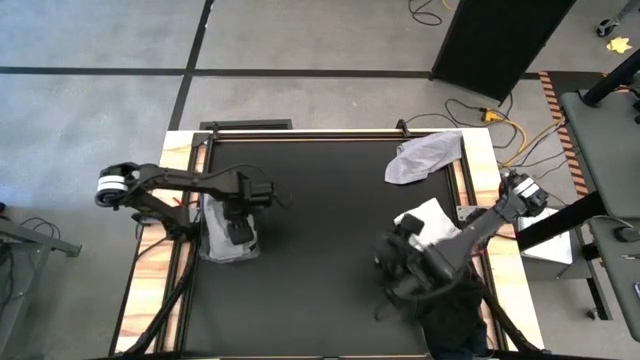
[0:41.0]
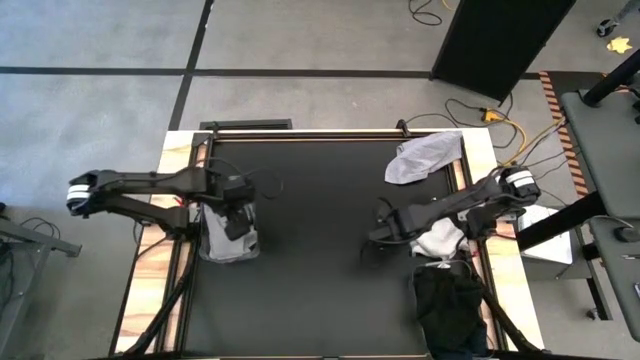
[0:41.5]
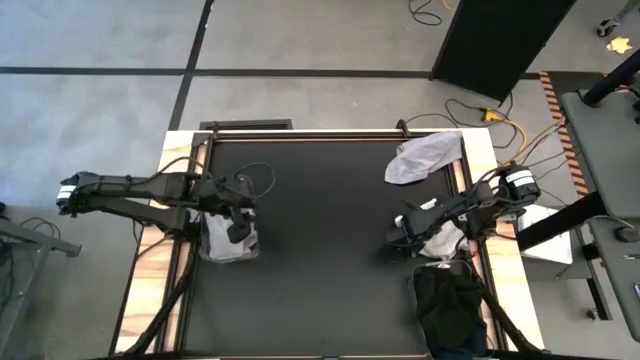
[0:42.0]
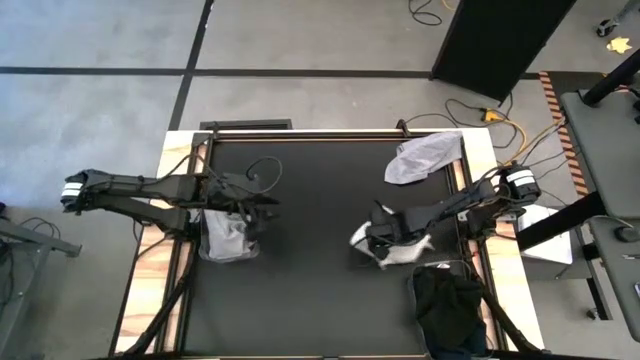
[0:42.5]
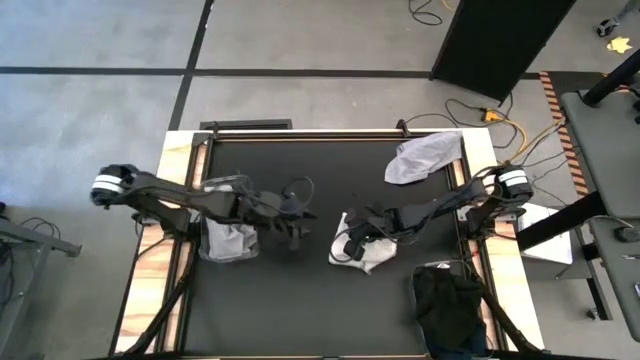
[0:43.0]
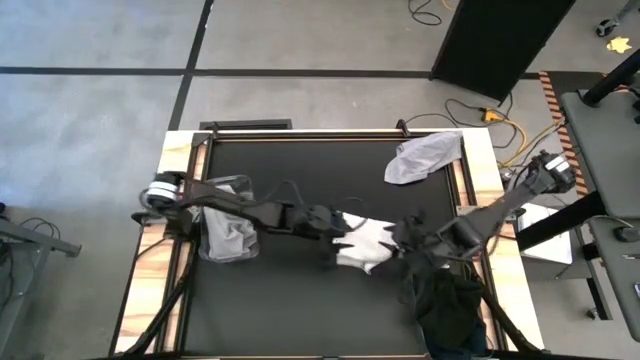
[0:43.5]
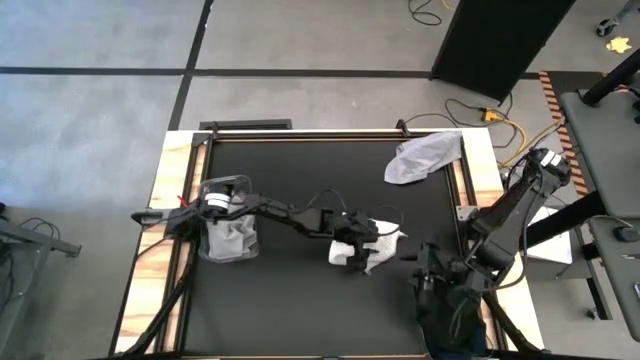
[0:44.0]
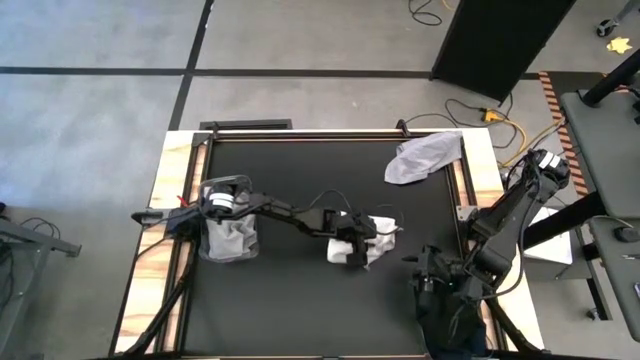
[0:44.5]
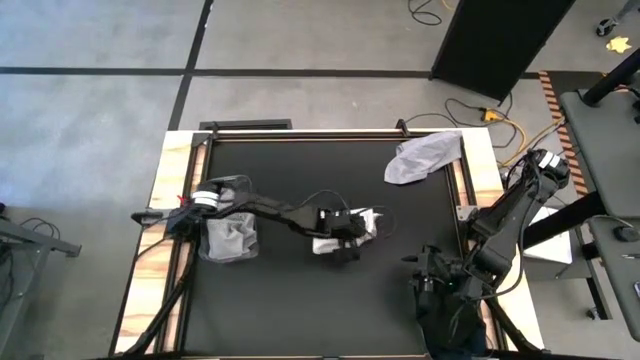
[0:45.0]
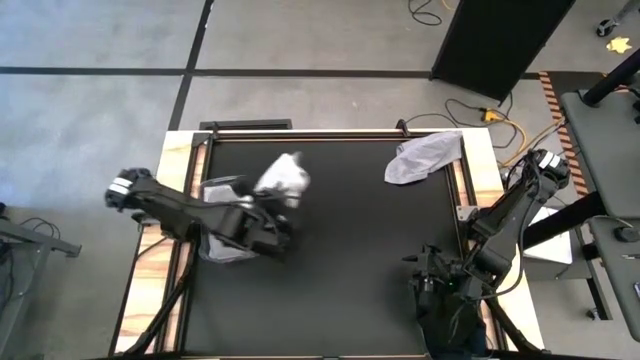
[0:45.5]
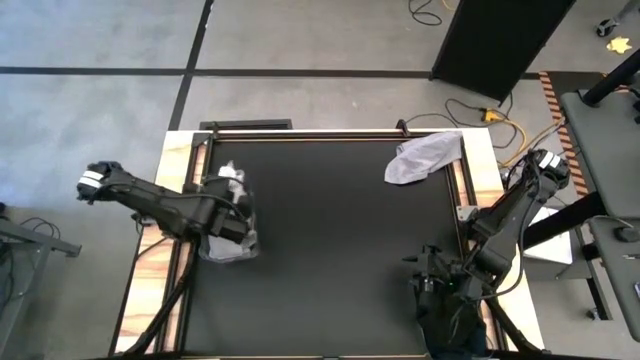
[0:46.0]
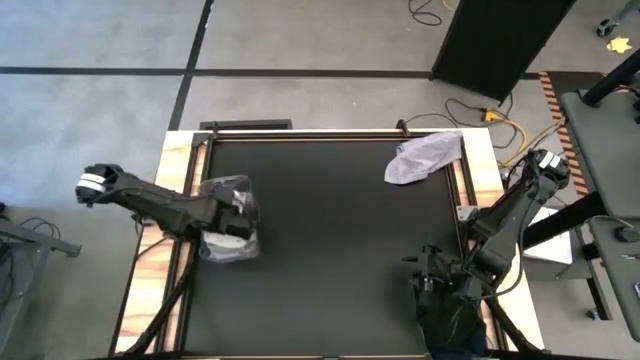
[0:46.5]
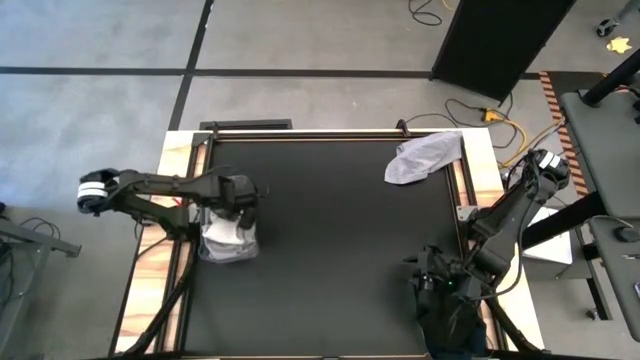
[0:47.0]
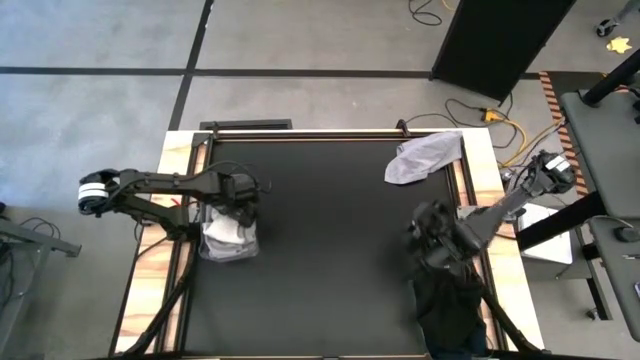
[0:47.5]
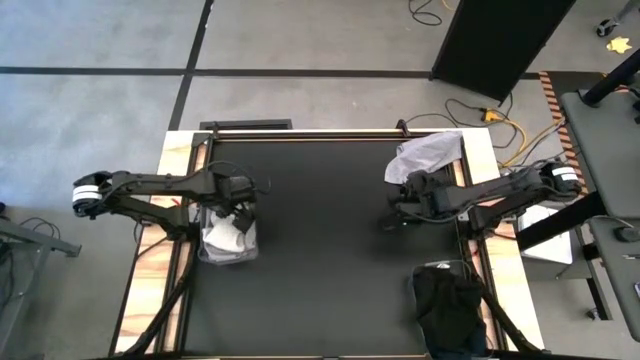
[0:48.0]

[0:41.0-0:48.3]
Task: Sort towels by color in basket
Put the white towel into the top transparent bin

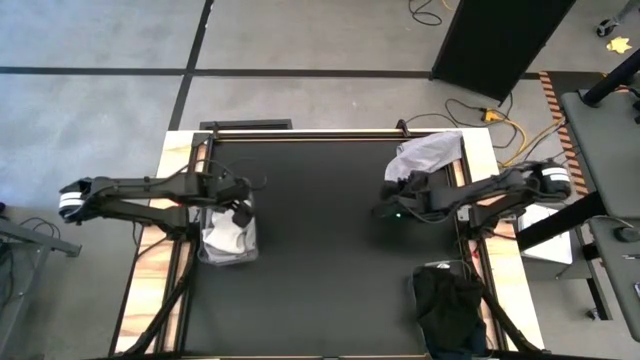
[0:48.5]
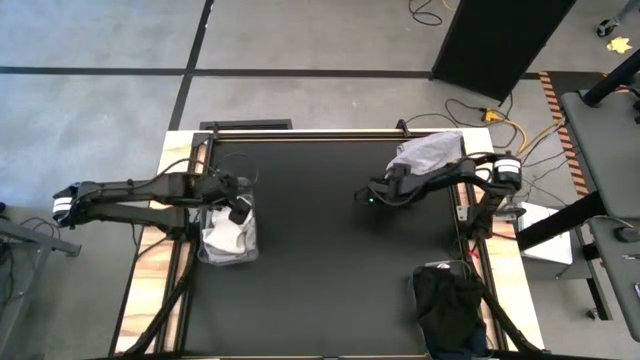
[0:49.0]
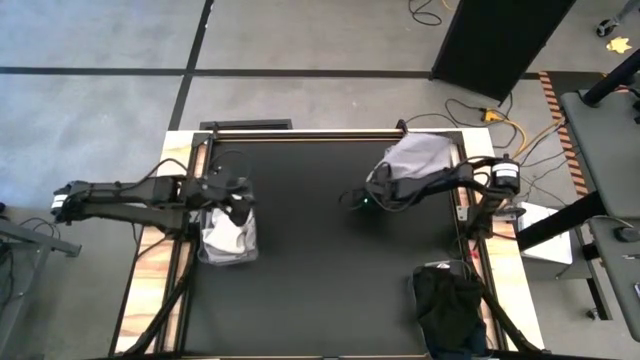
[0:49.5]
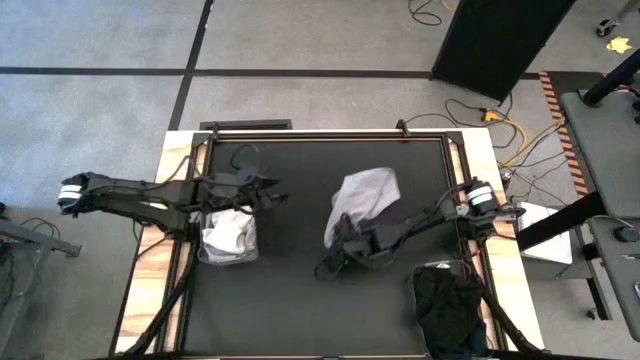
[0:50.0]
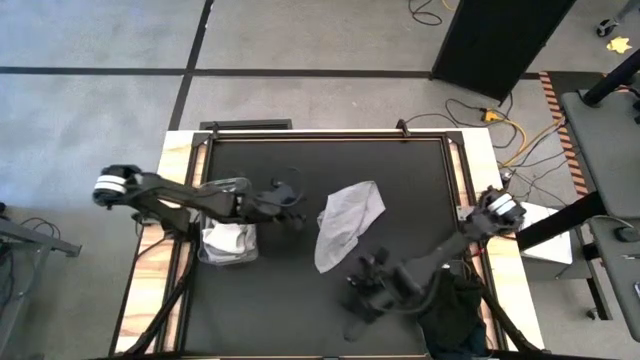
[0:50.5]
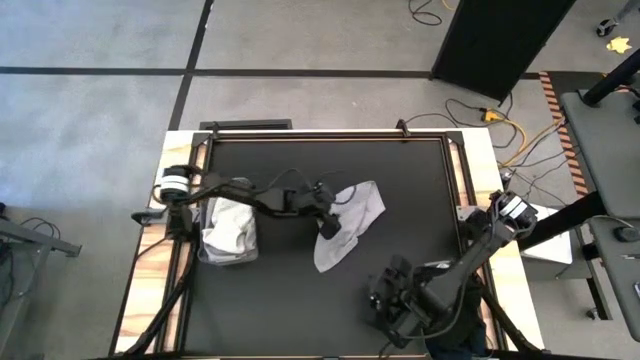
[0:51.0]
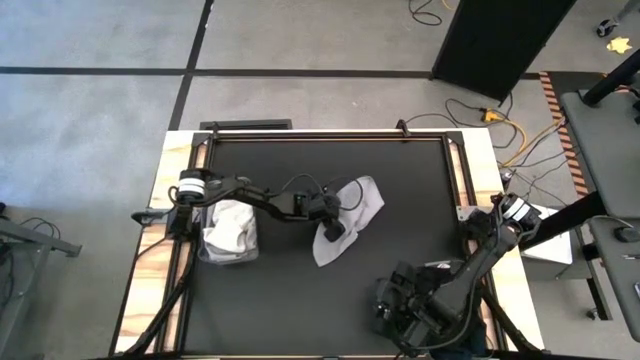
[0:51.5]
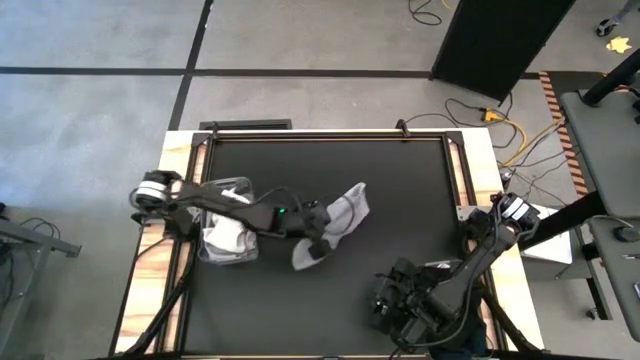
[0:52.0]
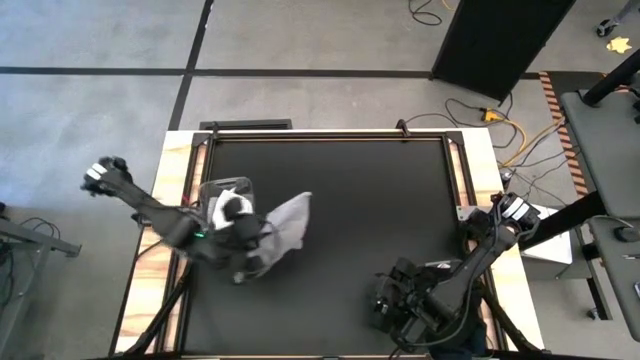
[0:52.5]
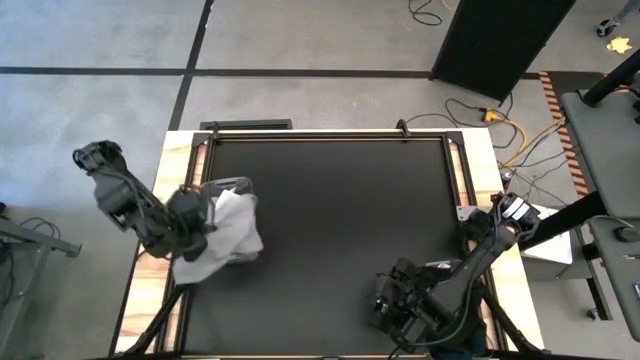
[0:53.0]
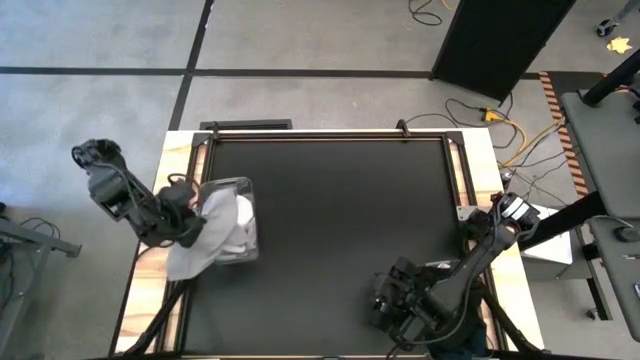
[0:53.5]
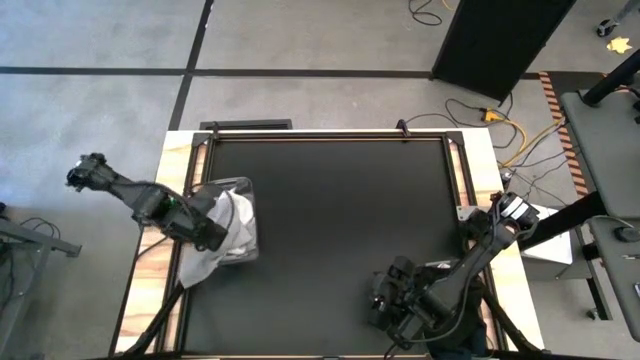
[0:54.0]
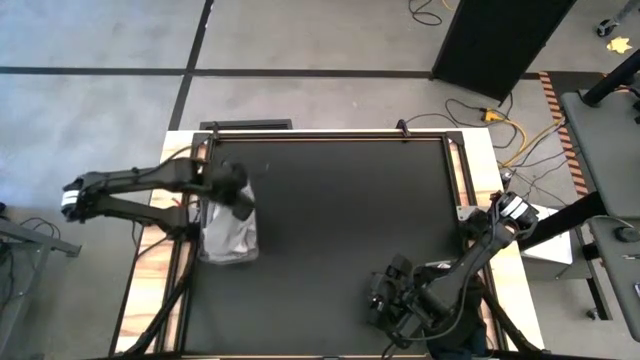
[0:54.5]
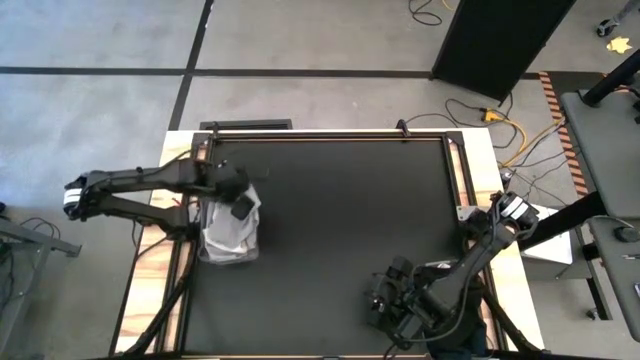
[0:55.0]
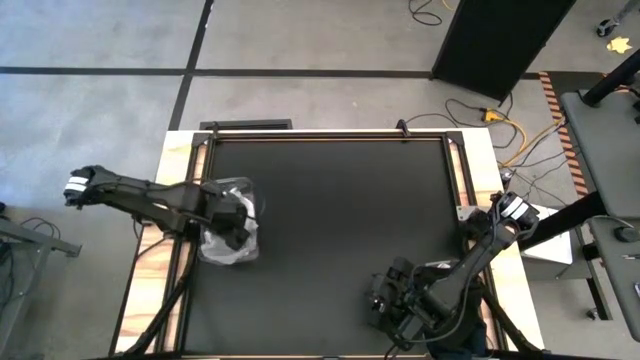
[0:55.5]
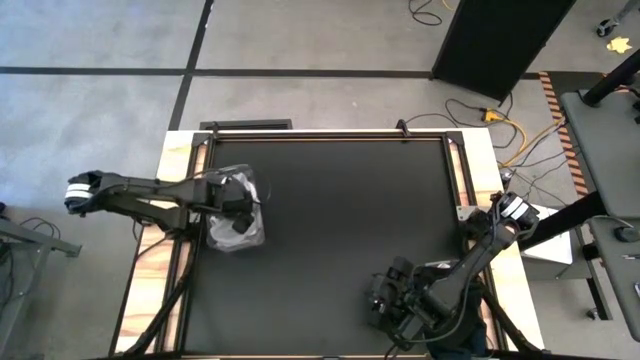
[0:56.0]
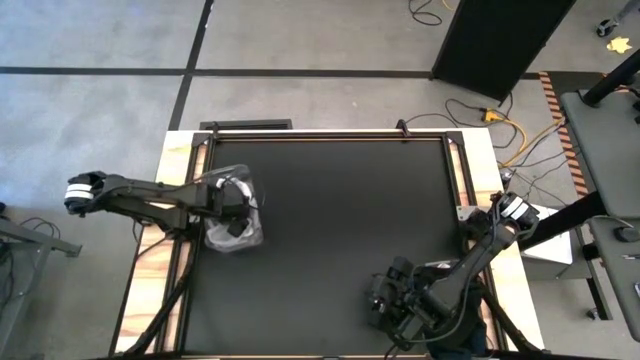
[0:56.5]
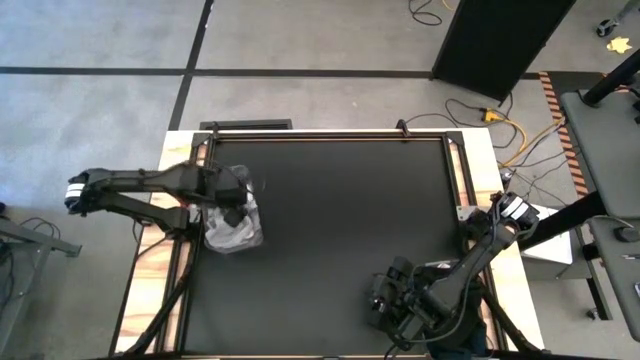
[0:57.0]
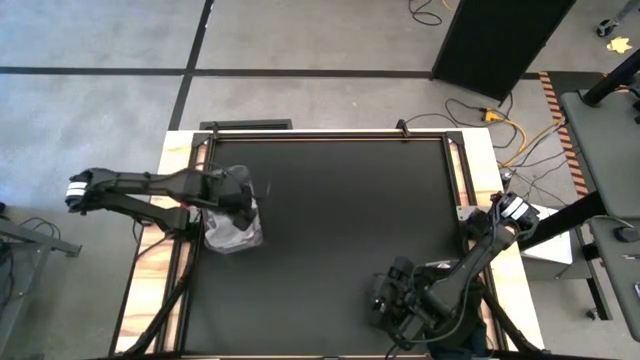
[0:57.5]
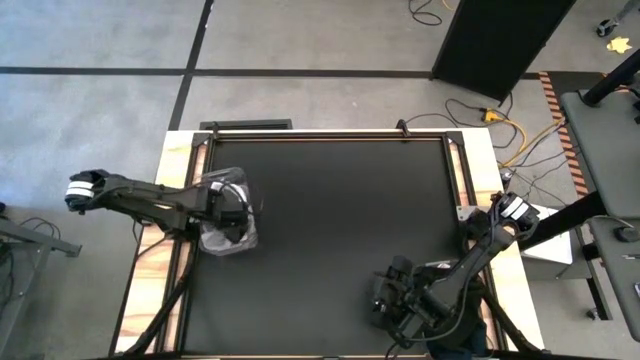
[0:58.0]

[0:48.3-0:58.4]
Put the gray towel into the top transparent bin

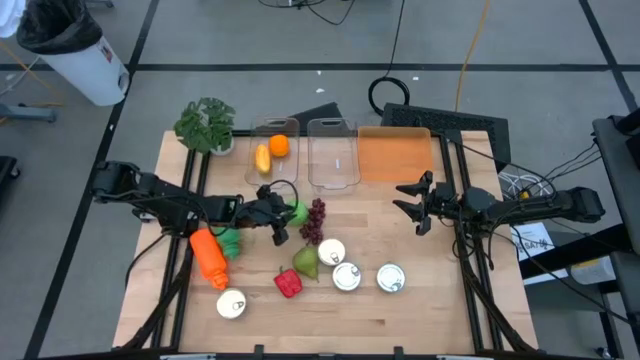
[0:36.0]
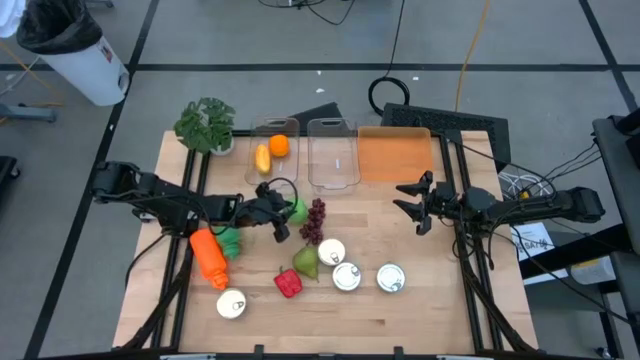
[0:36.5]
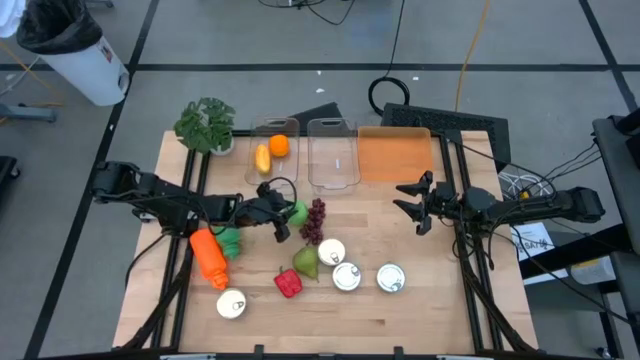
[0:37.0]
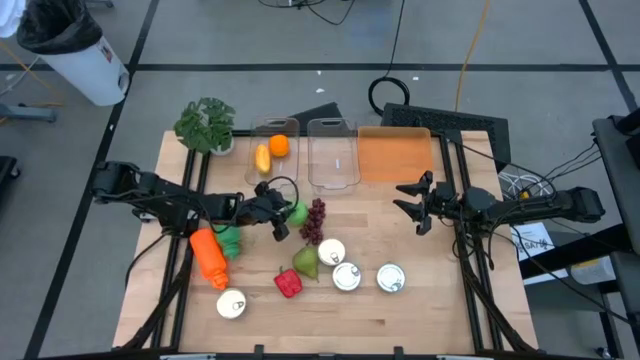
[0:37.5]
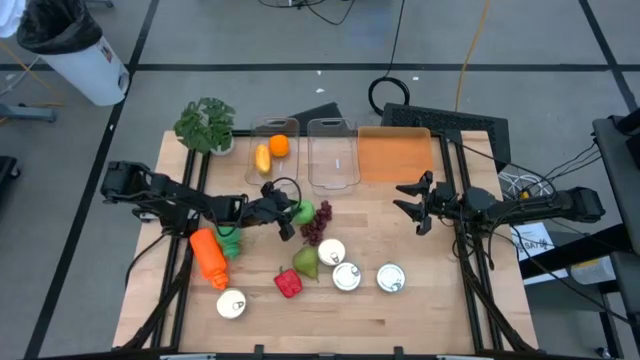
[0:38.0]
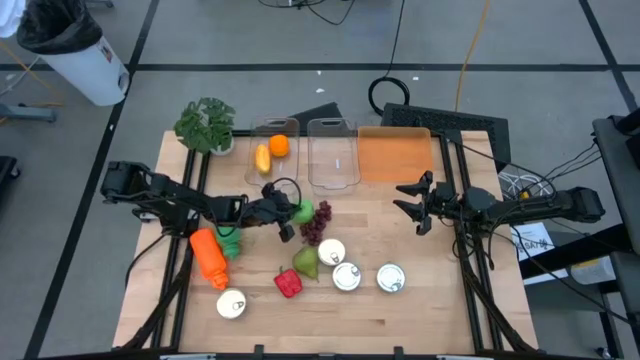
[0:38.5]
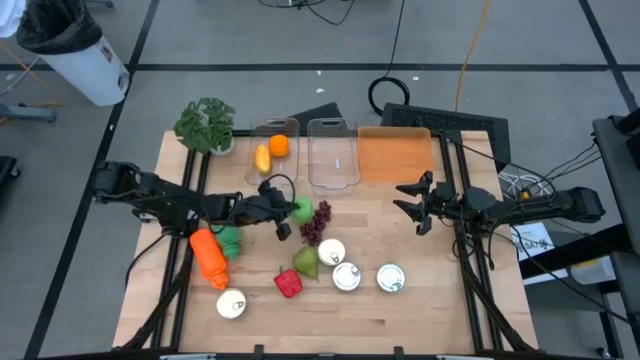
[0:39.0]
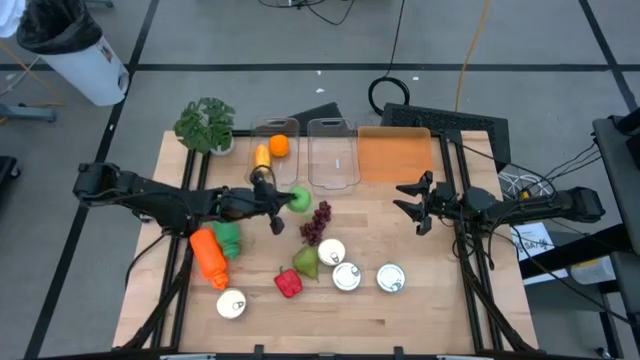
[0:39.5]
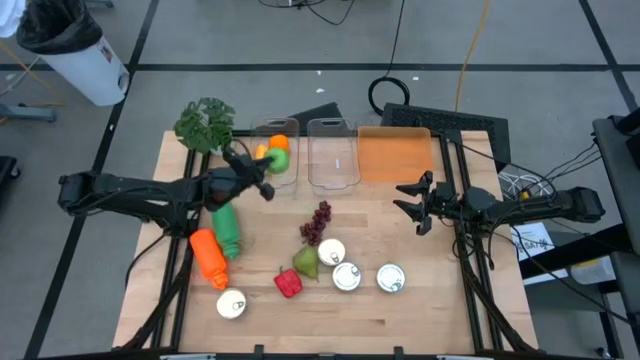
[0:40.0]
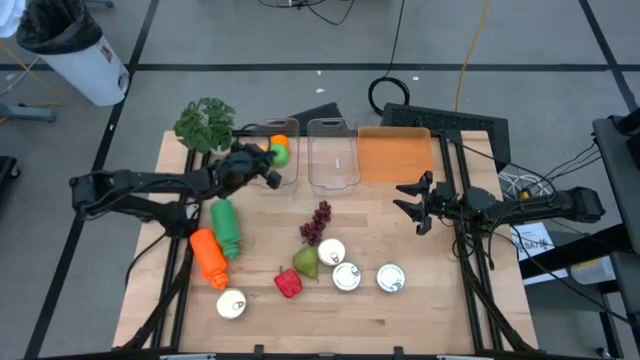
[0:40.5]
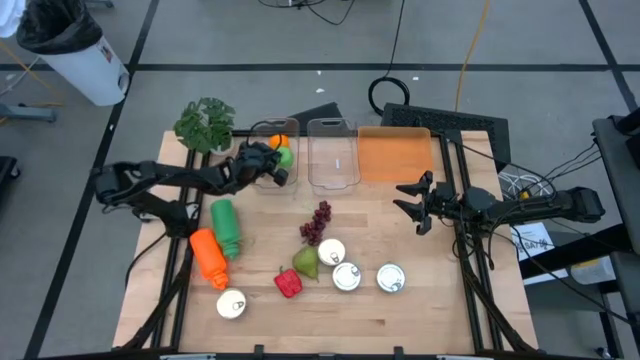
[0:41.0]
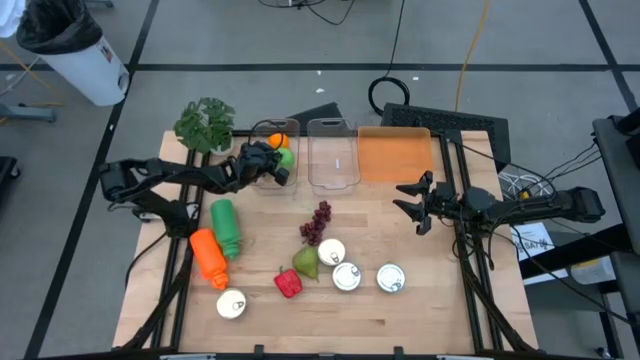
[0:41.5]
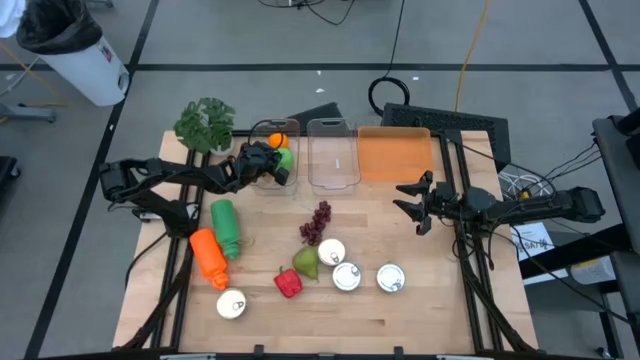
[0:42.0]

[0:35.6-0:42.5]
Task: Pick & Place Food Item
Put the green apple into the left transparent bin
